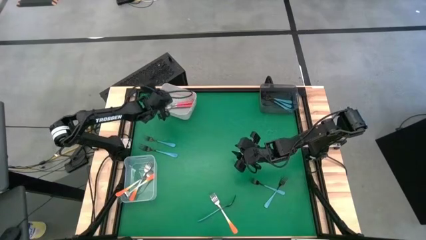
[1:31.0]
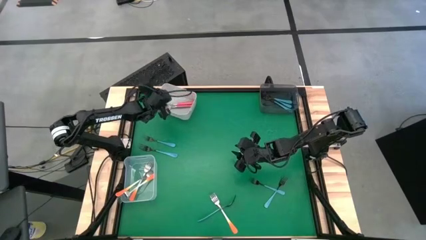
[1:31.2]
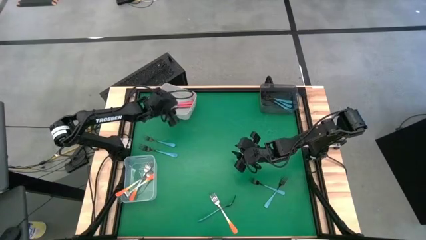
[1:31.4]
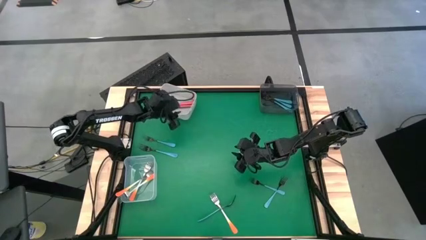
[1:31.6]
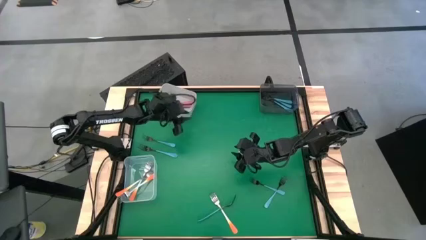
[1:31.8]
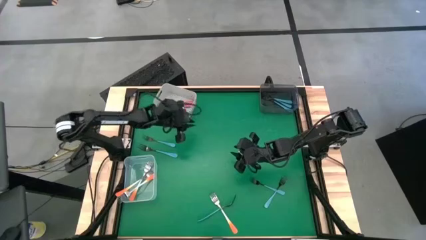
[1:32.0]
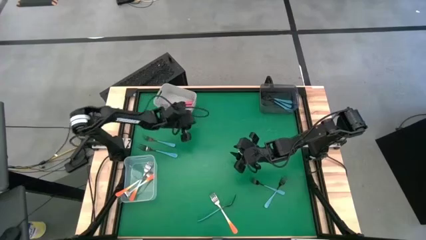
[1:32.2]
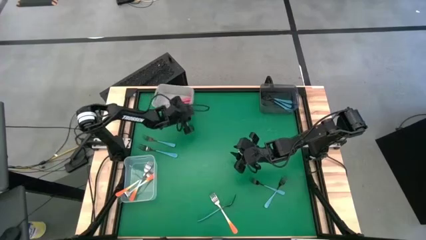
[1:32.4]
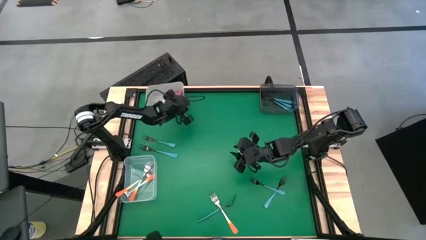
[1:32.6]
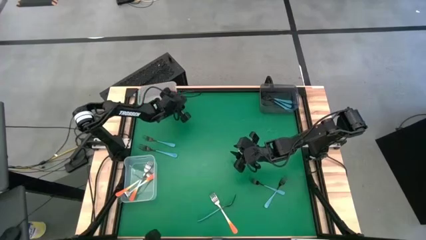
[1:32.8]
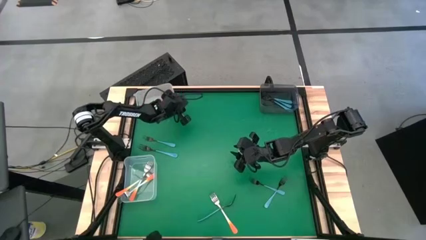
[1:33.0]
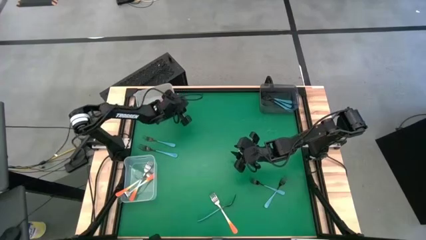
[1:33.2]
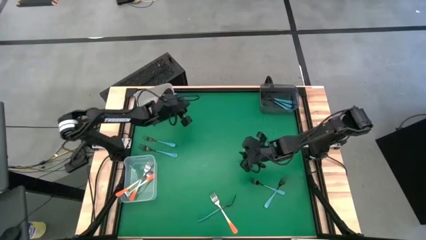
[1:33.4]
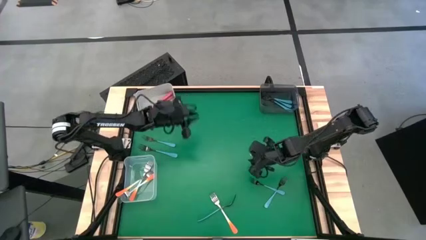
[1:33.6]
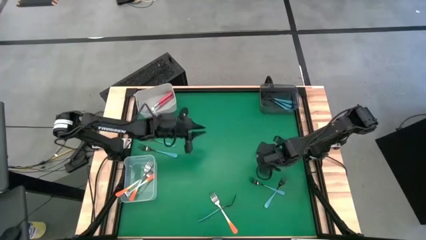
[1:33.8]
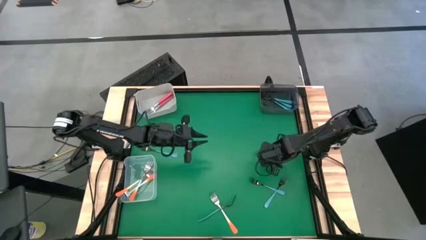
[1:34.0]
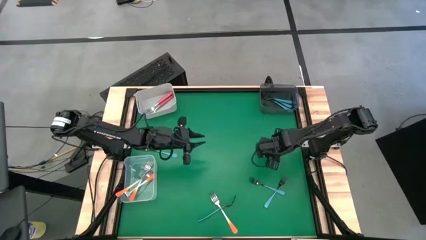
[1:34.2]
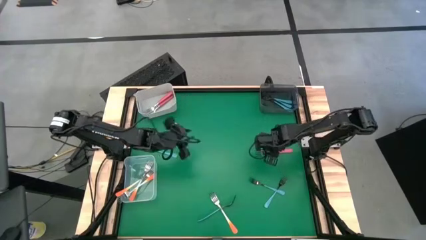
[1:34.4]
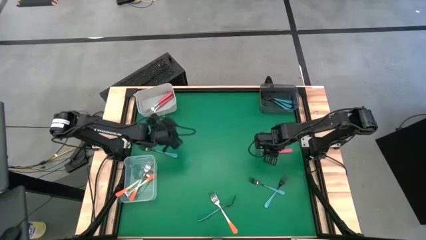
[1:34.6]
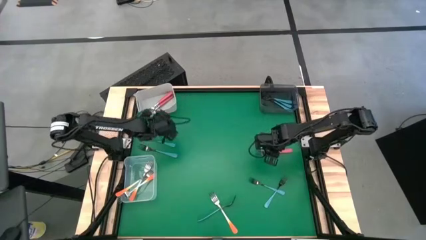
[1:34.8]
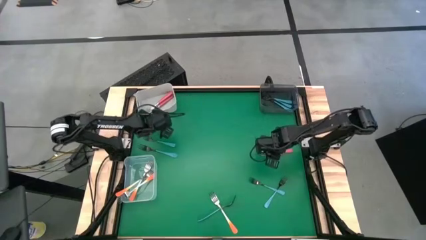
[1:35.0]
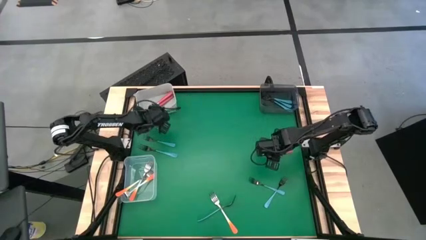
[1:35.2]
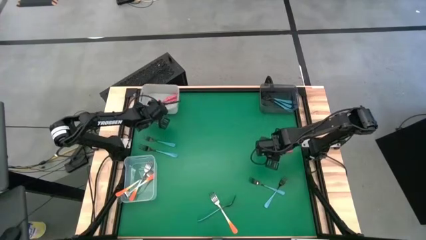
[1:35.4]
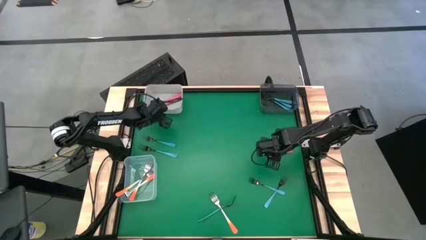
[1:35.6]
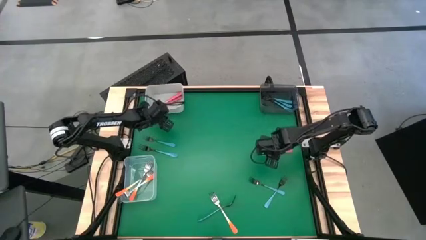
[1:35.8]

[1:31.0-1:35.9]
Task: Sort silverware by color (type)
Adjust the white bin

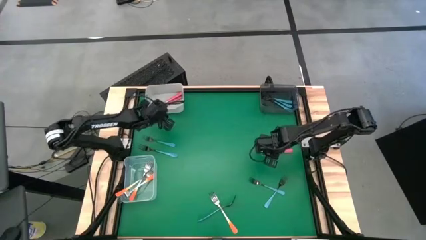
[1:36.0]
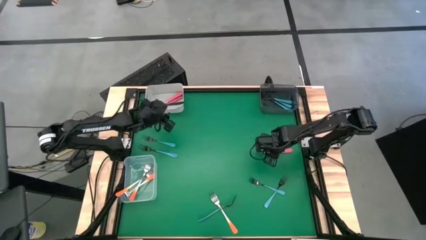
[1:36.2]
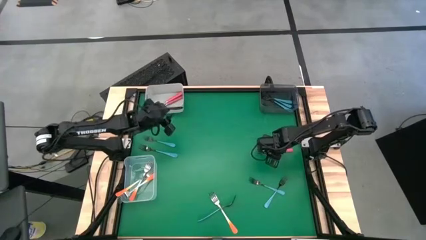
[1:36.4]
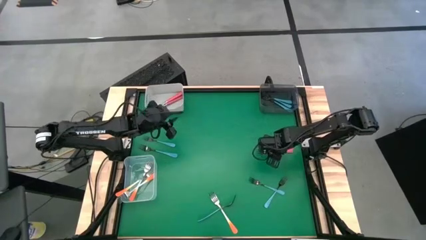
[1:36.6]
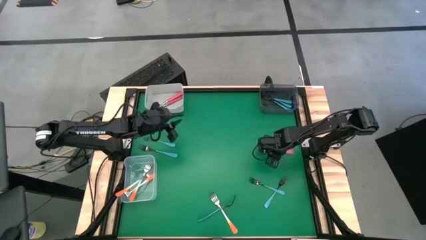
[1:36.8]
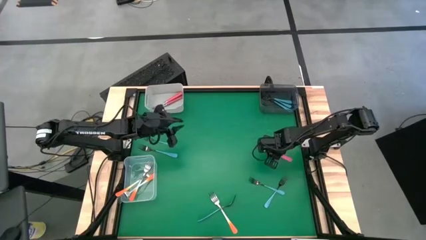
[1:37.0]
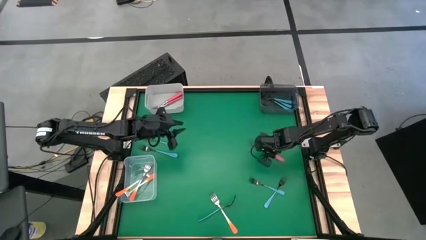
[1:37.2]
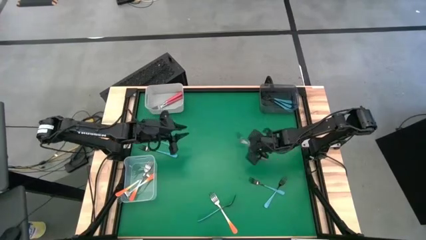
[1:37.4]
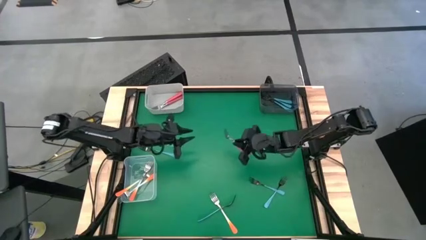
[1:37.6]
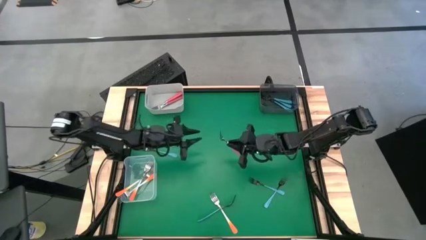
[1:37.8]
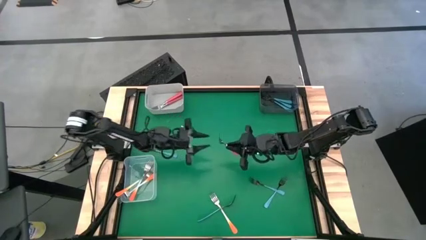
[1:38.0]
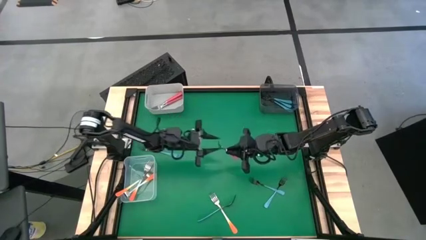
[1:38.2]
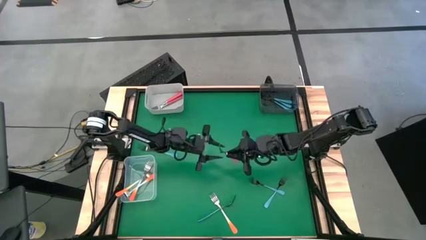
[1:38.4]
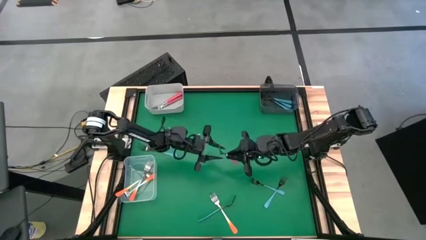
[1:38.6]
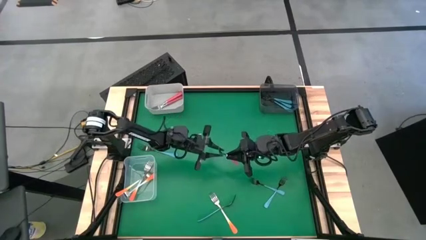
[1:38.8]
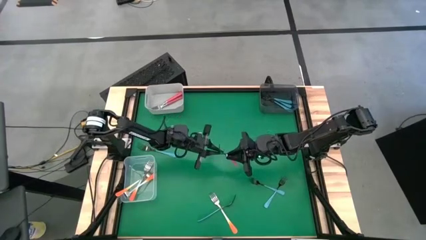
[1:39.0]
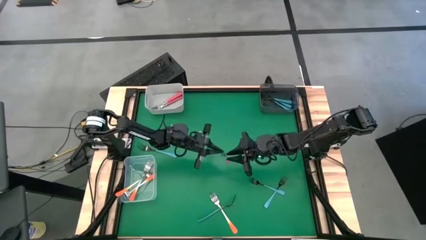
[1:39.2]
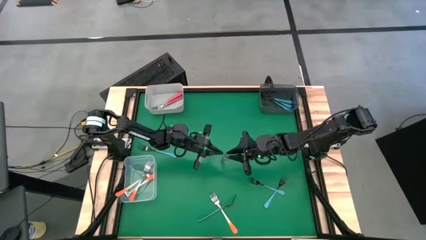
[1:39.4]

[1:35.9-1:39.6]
Put the pink fork into the white bin

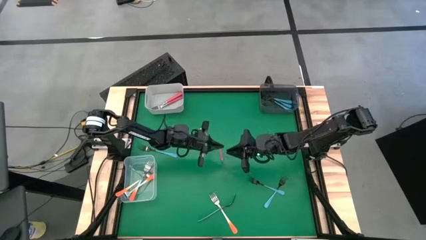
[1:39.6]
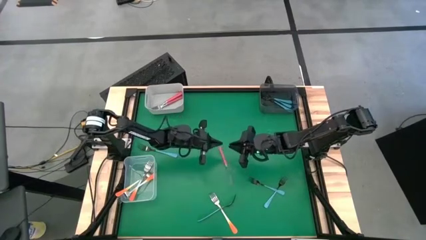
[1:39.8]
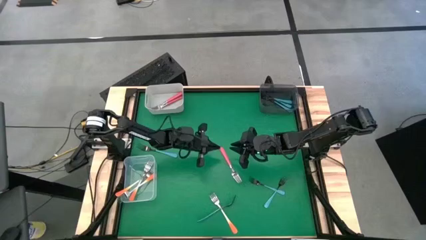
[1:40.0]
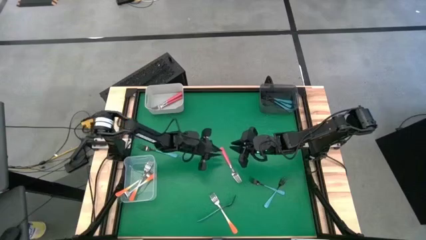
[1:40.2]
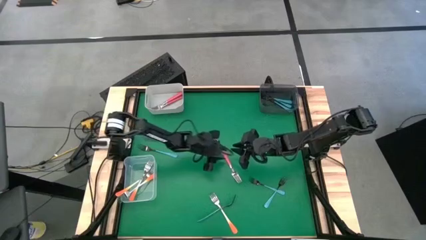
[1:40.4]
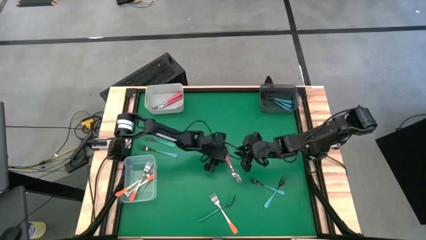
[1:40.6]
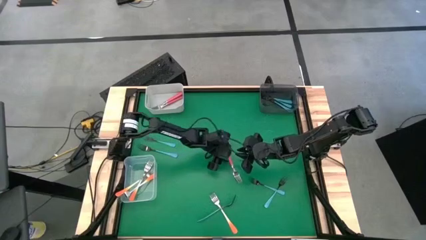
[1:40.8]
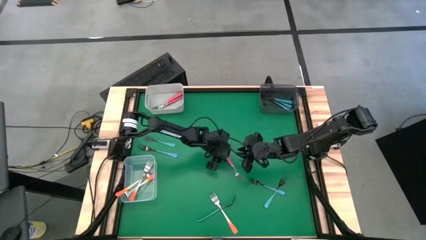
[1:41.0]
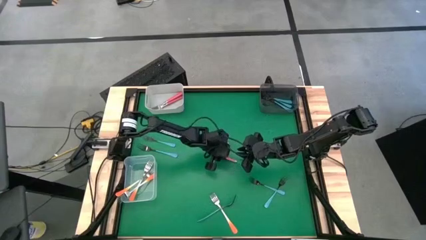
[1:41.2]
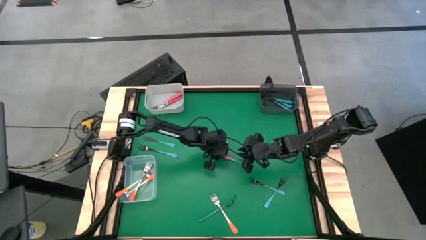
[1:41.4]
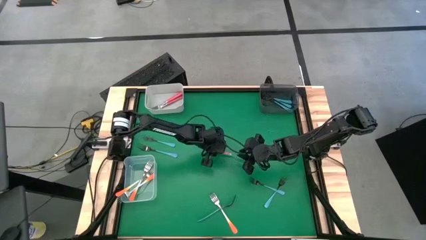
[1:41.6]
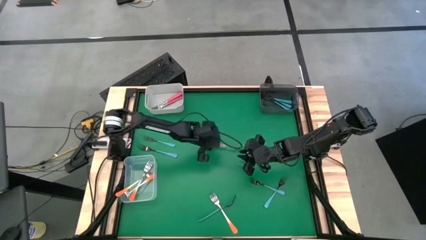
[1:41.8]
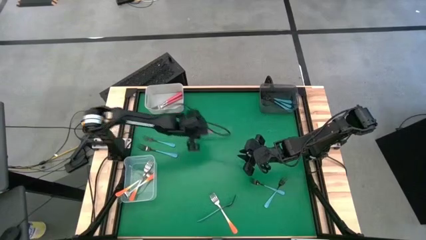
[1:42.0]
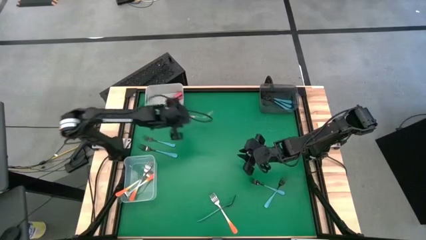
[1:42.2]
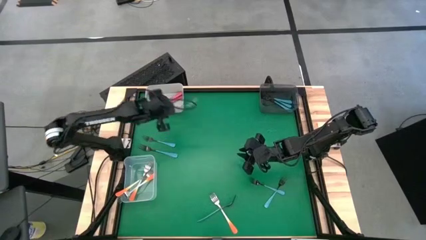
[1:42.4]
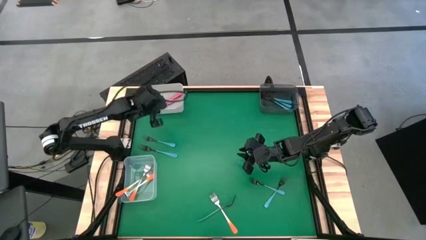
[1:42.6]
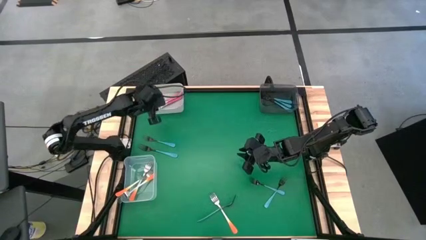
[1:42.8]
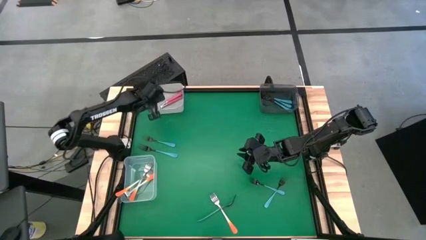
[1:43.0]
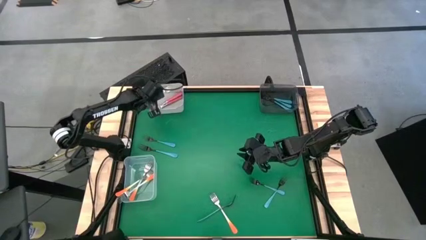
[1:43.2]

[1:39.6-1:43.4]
Put the pink fork into the white bin

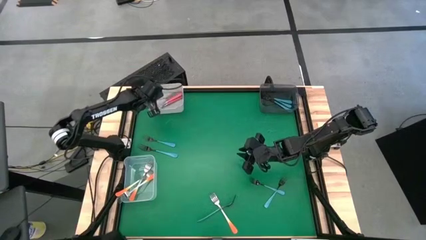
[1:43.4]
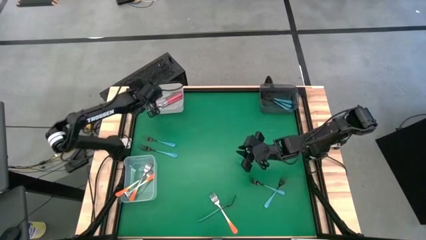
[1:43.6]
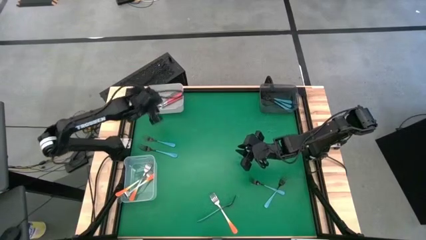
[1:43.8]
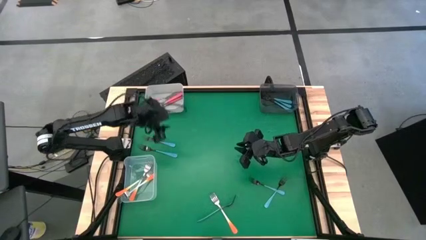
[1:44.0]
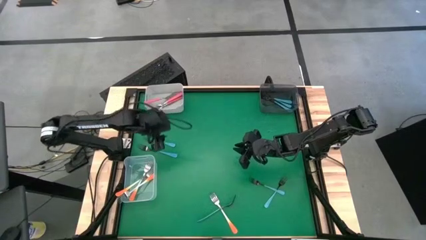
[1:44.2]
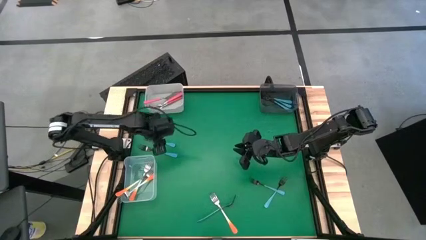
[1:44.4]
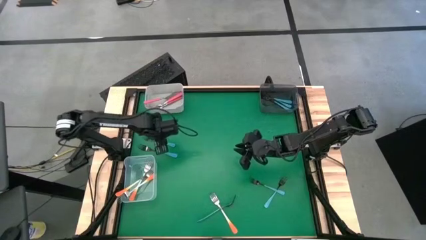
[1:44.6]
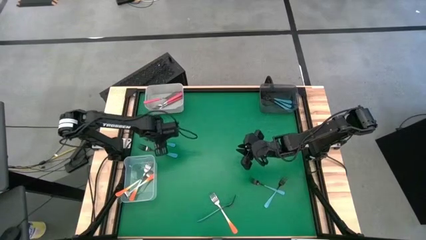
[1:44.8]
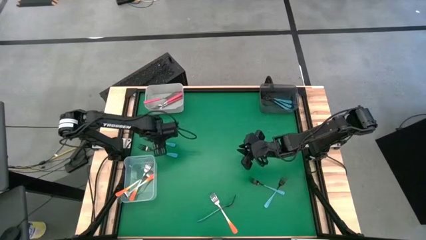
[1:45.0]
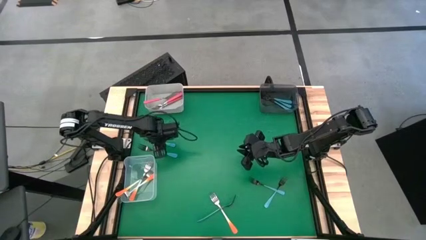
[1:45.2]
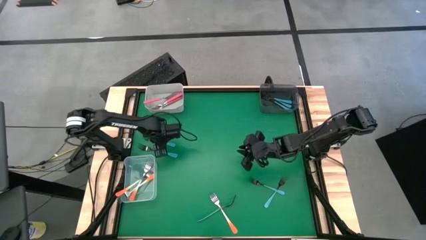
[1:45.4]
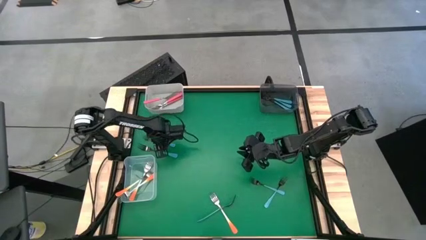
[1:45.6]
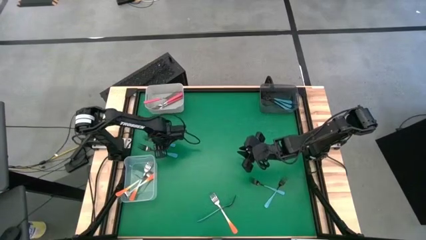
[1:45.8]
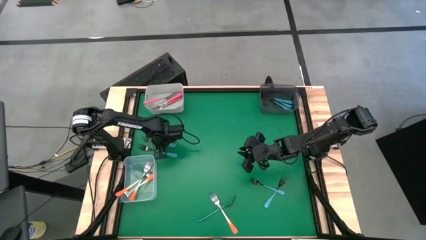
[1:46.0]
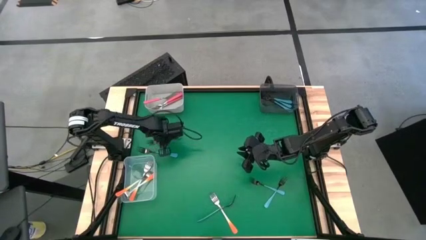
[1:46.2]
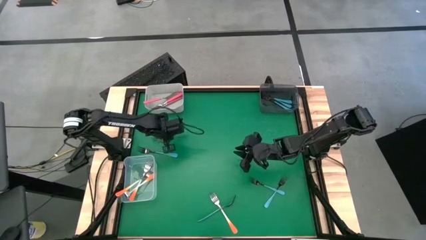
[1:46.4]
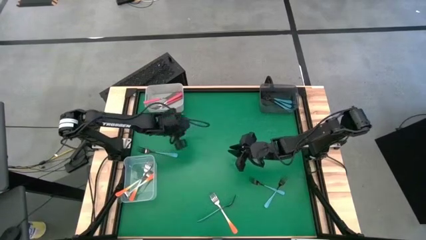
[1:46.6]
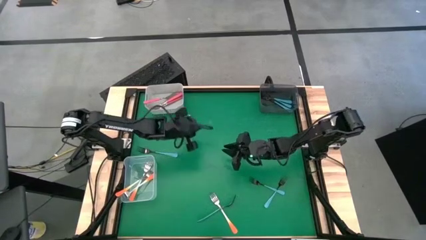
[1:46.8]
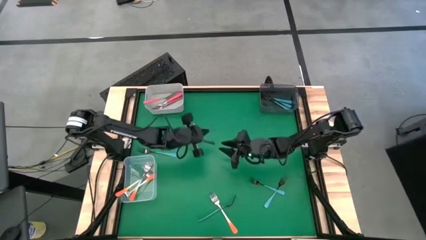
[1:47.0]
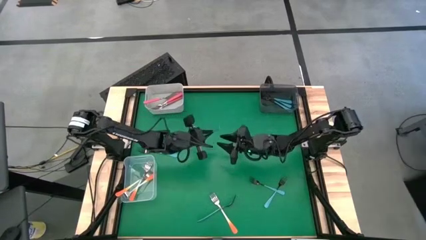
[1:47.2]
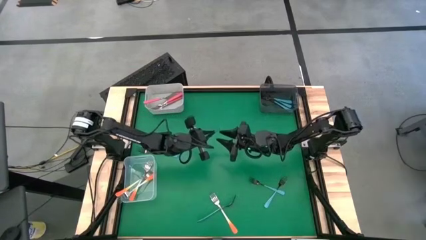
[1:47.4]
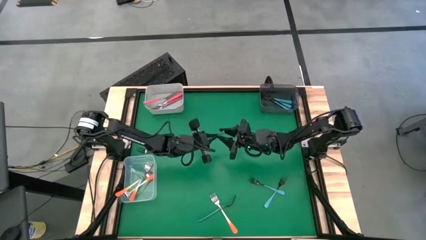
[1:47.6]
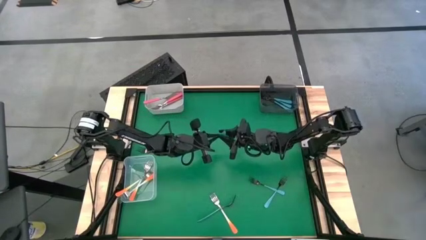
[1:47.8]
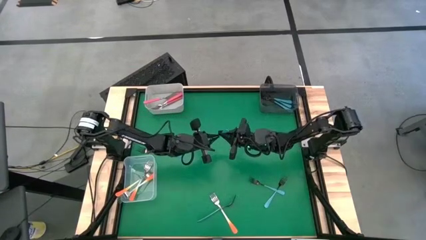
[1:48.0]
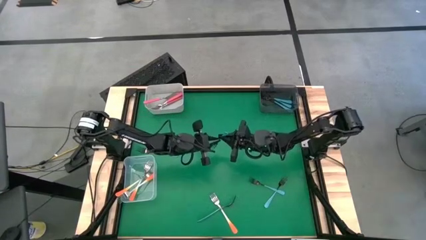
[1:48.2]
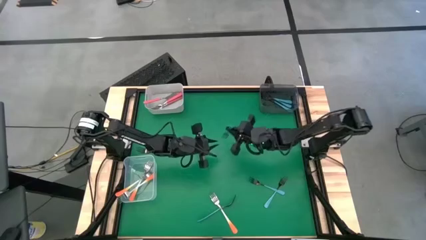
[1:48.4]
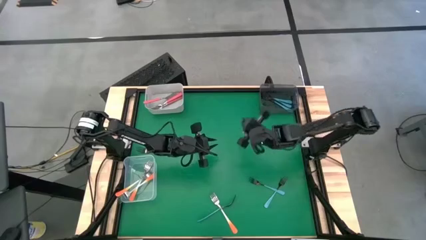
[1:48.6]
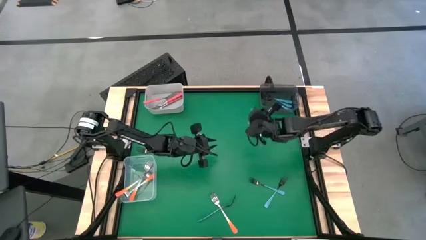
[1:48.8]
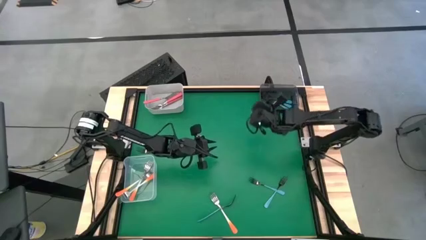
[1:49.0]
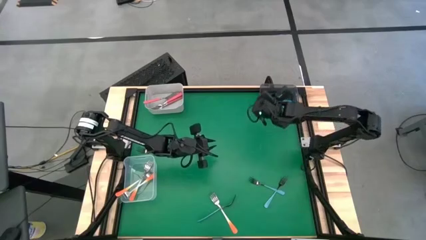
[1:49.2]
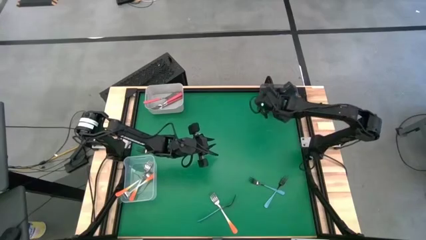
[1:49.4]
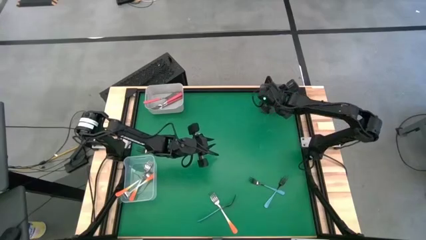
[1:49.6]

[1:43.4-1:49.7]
Put the blue fork into the black bin
